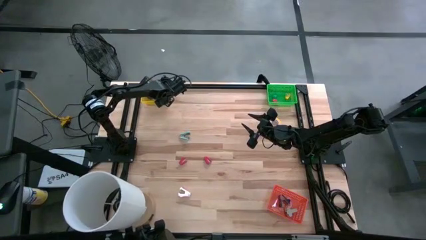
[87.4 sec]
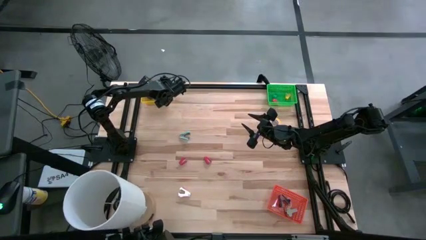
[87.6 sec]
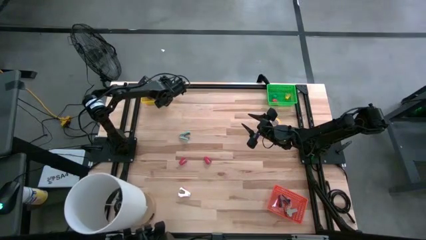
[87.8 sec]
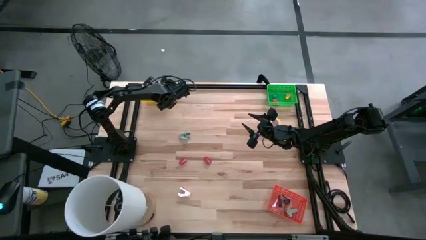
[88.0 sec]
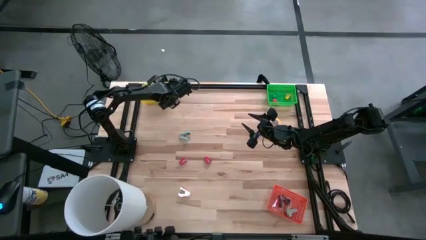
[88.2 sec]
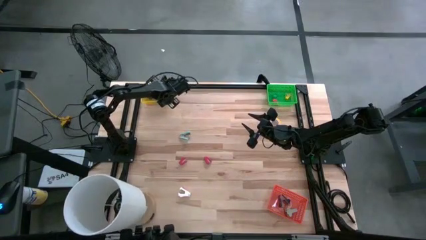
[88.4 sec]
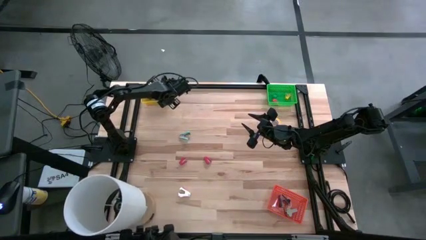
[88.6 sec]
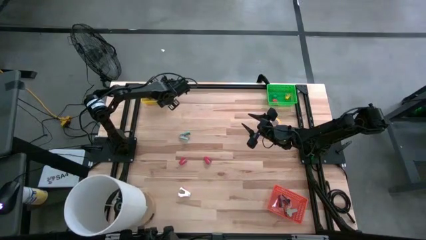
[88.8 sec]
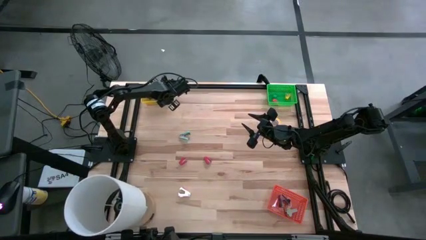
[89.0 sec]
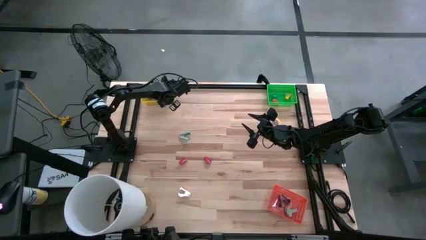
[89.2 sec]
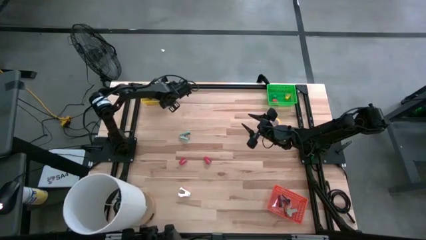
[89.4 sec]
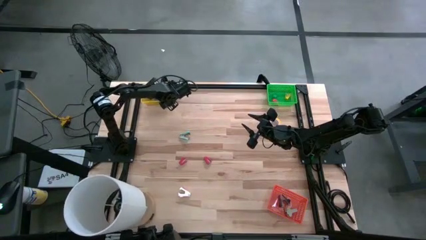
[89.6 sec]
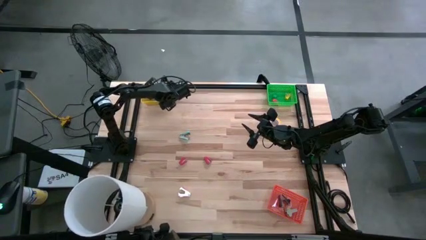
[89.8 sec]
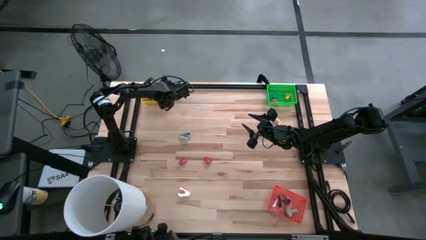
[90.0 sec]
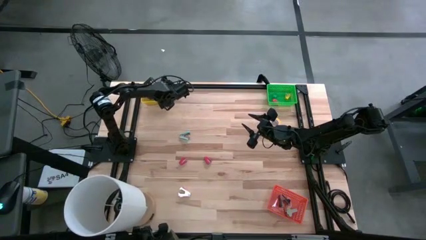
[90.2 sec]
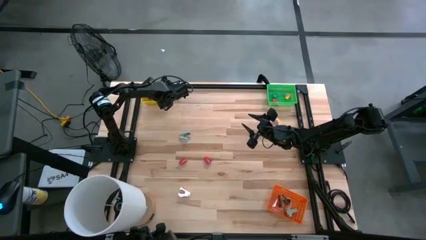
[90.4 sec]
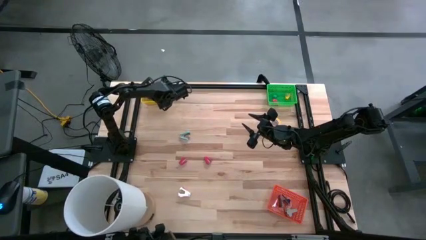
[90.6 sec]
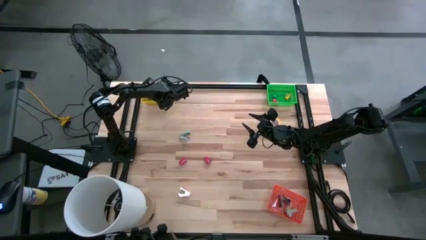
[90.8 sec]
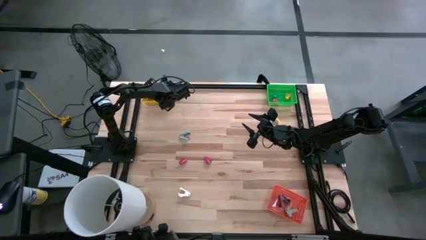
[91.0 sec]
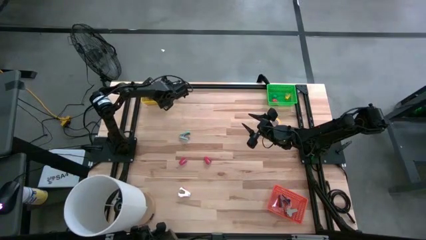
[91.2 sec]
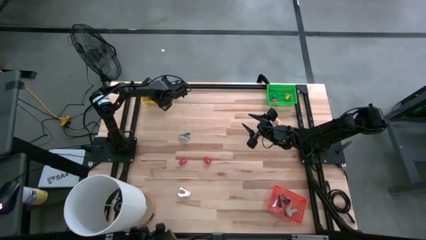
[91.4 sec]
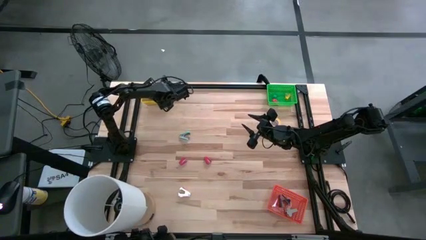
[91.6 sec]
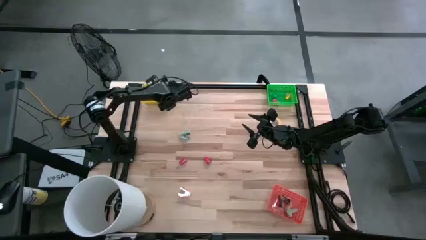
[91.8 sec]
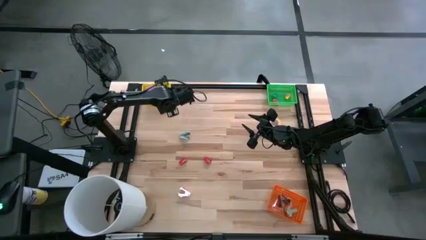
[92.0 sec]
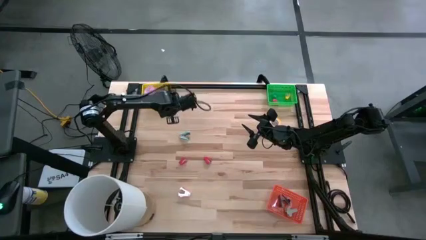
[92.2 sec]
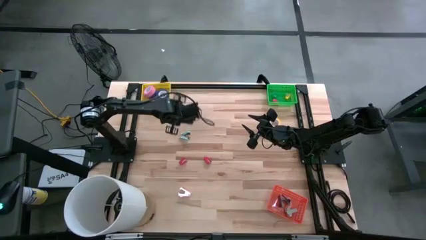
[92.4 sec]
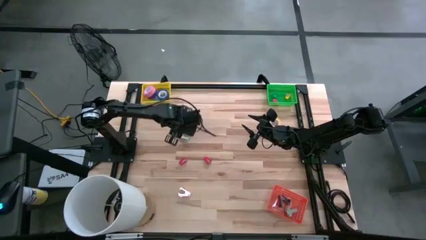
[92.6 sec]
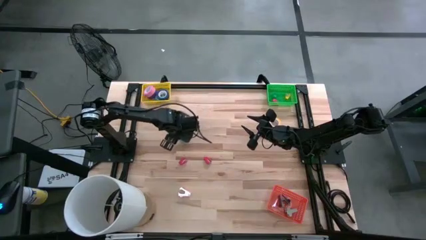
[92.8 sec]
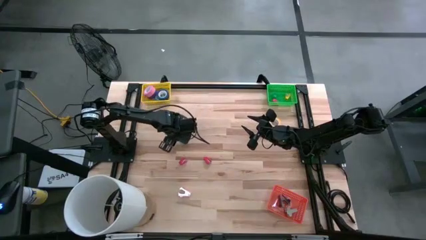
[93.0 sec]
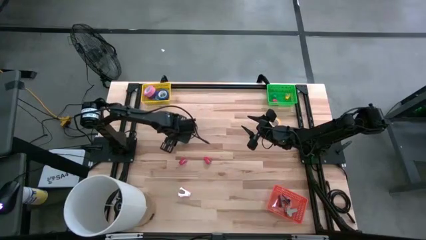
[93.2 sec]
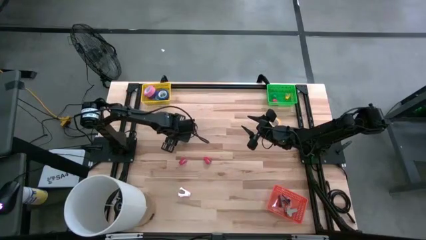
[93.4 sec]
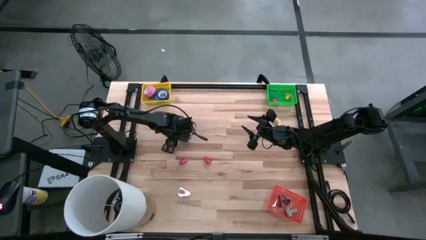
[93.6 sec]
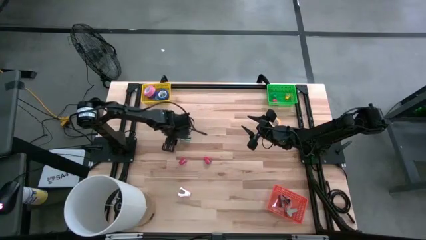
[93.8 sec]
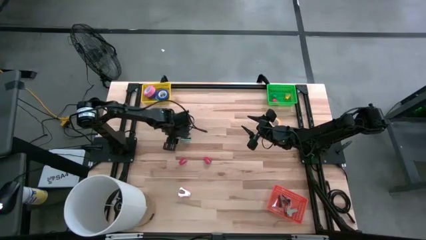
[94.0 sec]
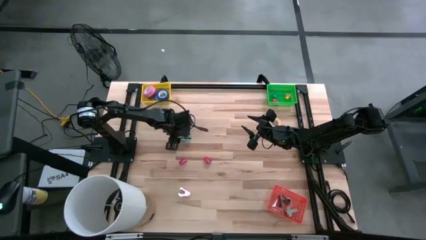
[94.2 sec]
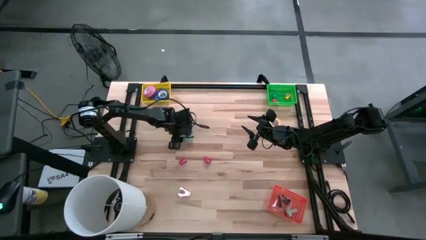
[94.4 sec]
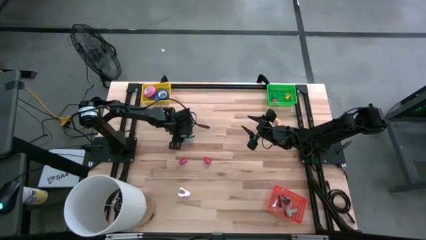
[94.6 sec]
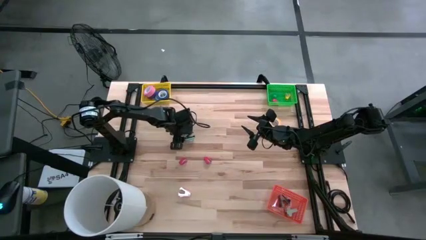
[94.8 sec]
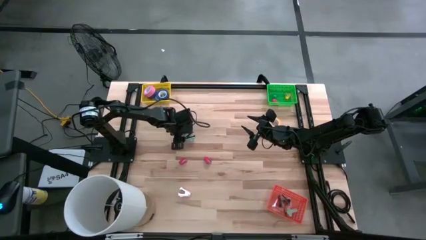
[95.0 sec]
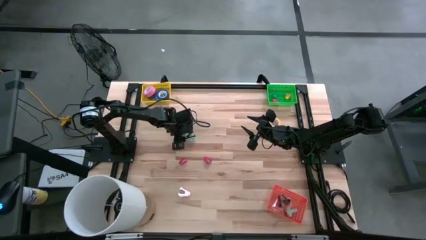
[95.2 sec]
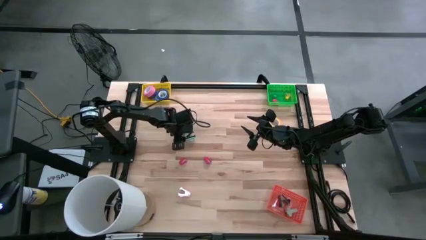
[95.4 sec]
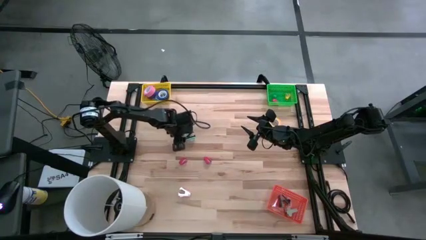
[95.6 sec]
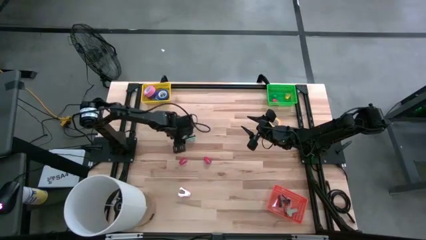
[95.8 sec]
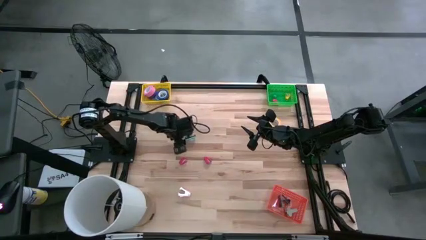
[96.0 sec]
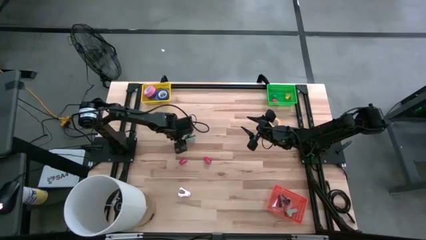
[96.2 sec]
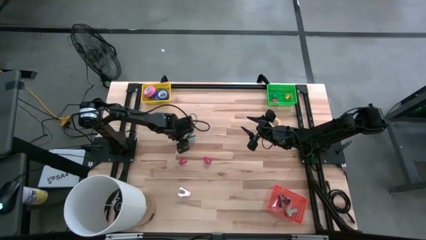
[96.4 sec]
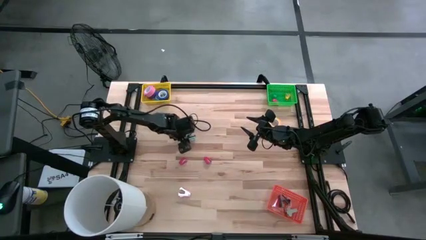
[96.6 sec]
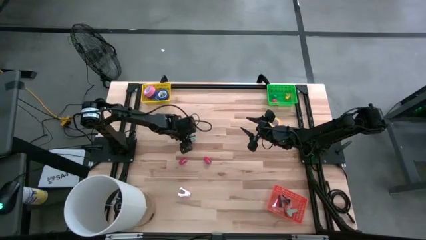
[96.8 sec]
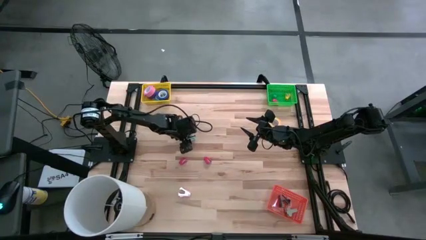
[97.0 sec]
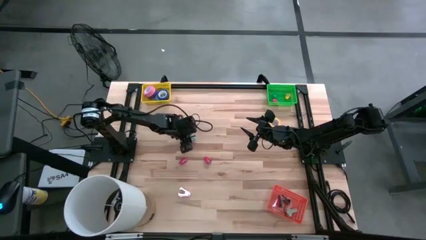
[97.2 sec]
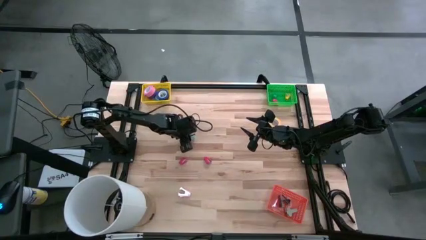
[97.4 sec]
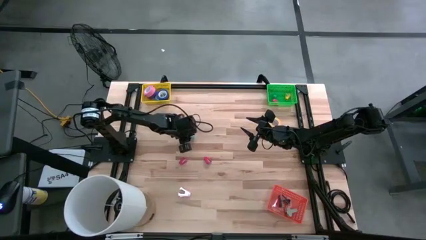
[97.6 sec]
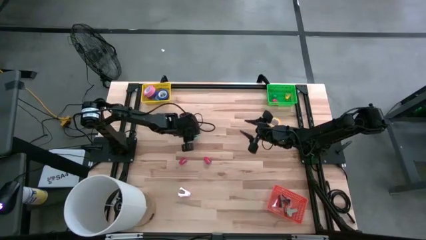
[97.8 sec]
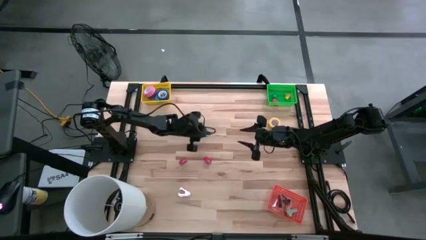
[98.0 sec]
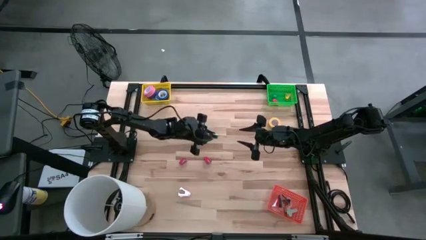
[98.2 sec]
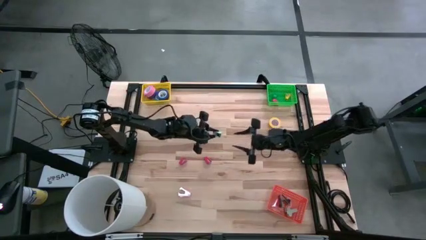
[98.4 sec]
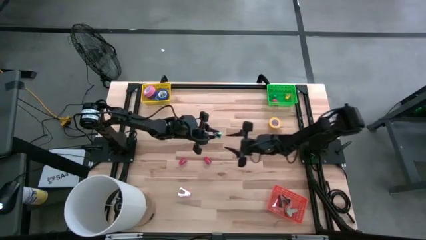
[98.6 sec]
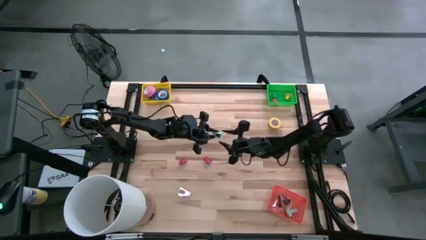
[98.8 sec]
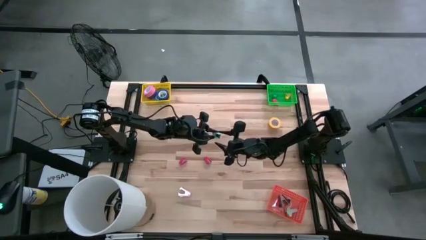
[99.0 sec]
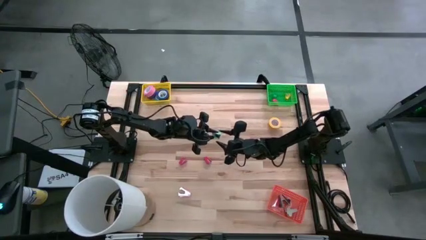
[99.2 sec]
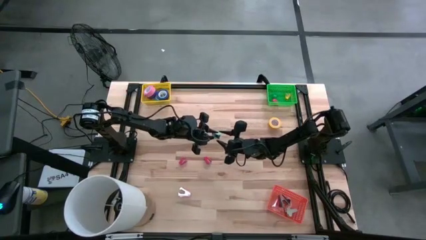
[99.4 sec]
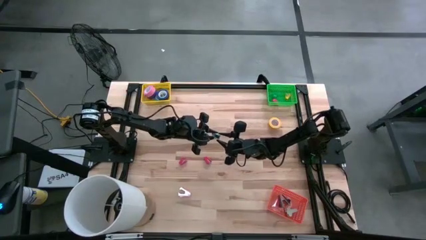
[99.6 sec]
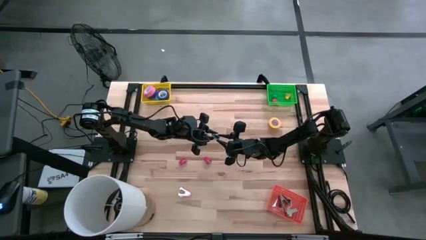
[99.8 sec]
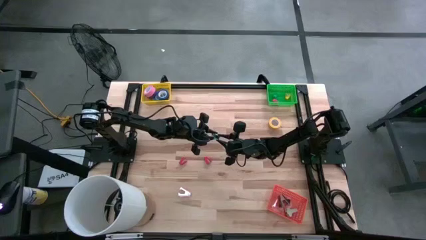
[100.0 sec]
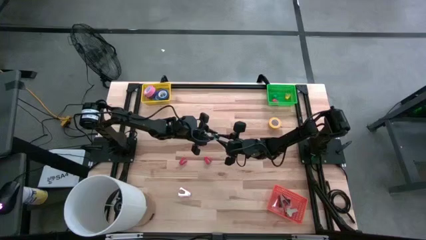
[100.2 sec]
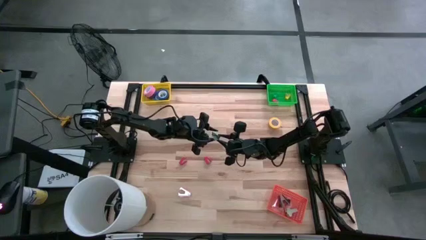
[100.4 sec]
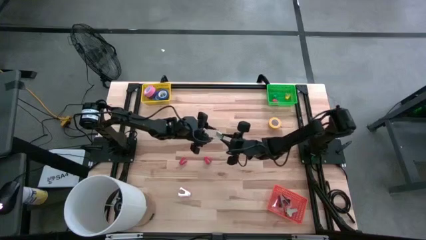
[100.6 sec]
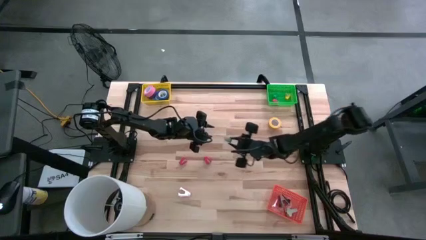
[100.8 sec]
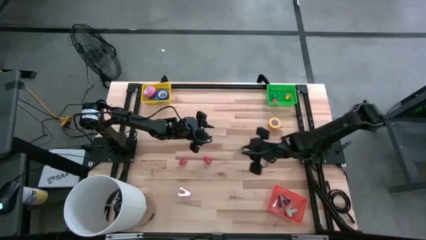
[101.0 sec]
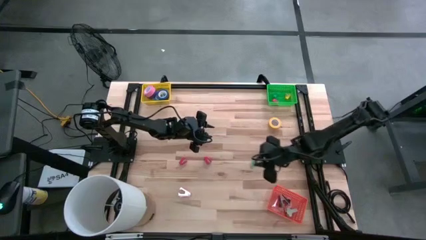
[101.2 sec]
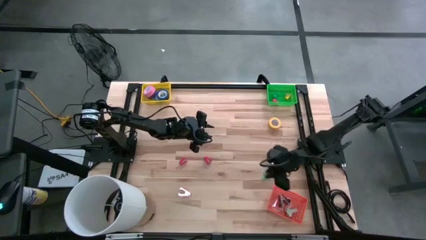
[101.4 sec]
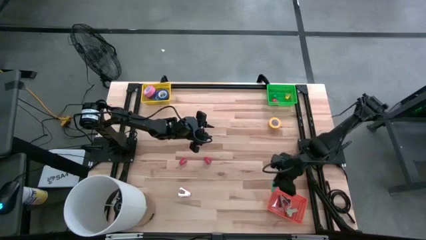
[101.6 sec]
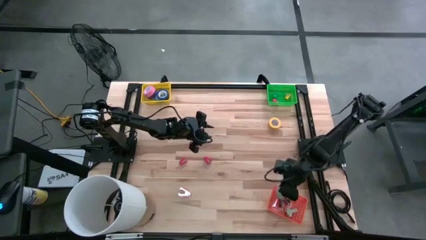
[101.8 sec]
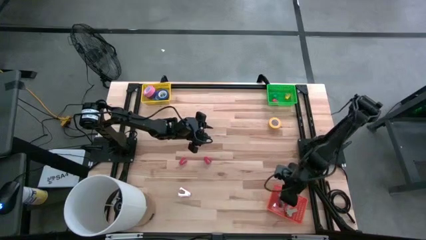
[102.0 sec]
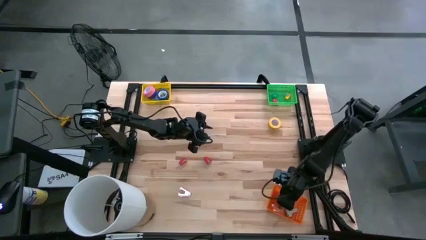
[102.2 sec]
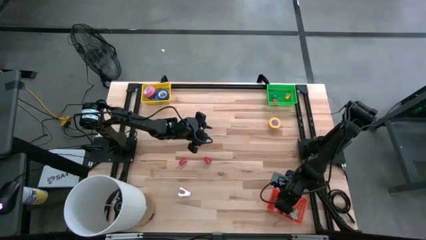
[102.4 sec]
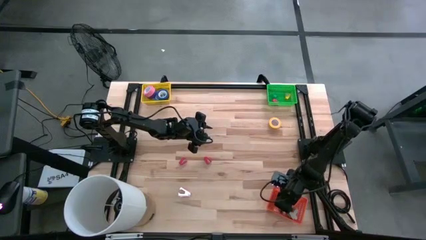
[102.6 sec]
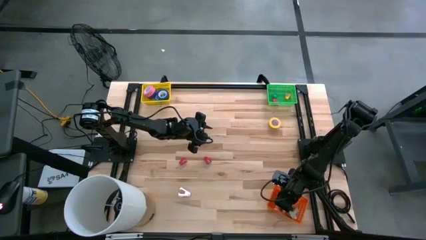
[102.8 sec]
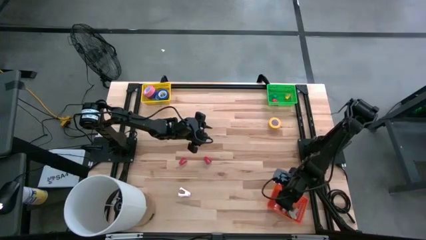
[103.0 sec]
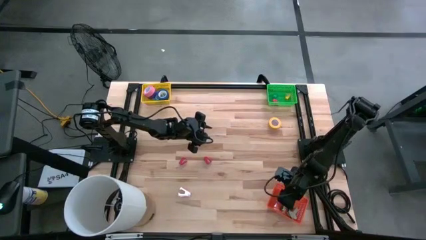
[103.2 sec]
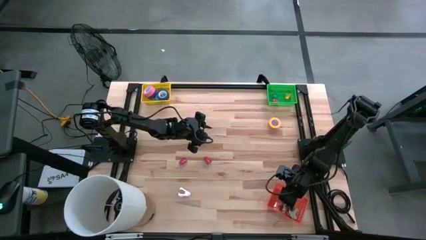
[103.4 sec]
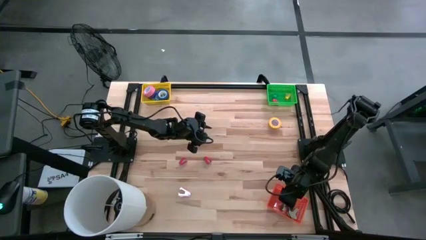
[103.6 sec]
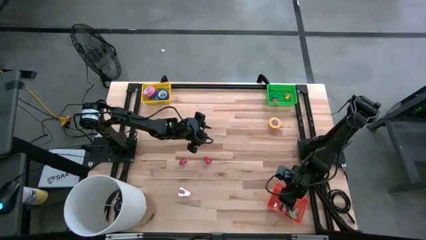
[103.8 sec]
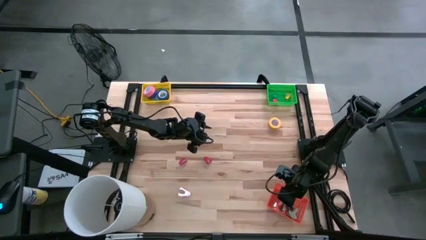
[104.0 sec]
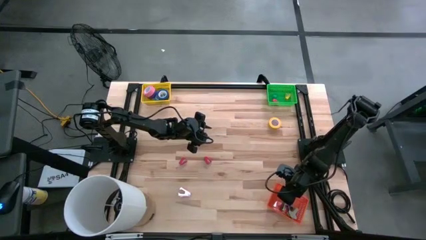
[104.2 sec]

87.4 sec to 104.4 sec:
Task: Pick and place Stapler, Stapler remover, tape
Put the light blue blue staple remover into the orange bin
